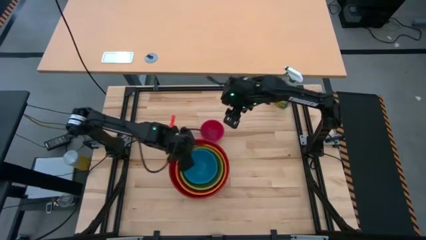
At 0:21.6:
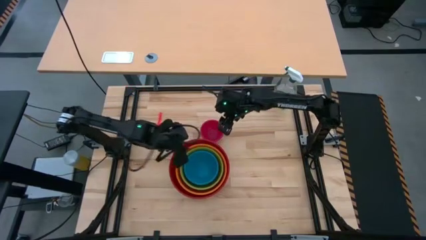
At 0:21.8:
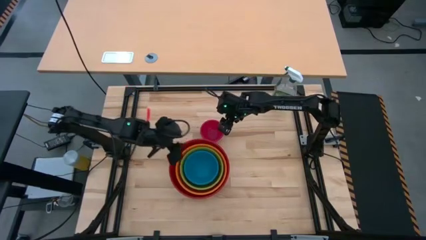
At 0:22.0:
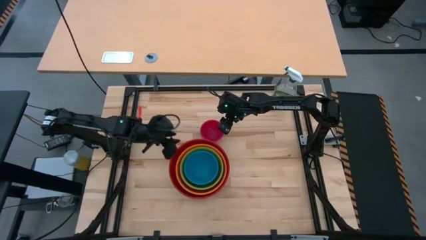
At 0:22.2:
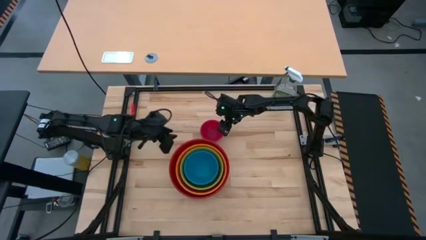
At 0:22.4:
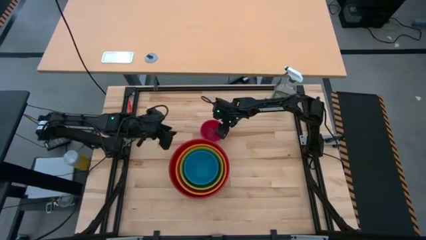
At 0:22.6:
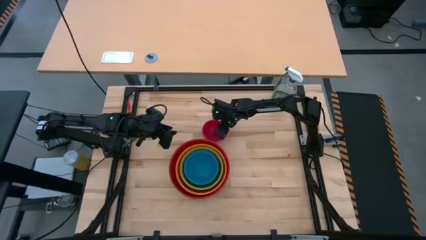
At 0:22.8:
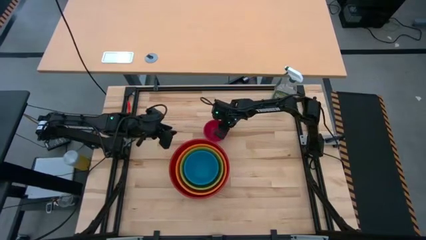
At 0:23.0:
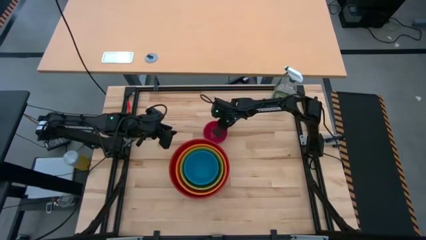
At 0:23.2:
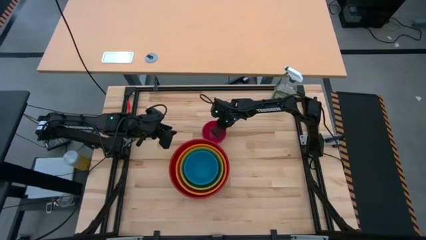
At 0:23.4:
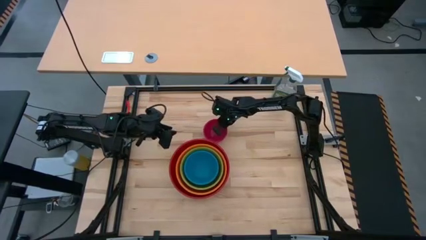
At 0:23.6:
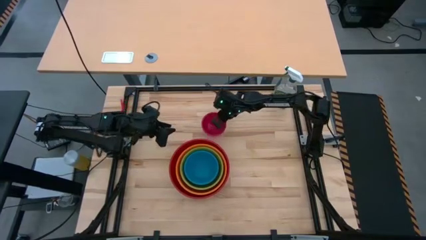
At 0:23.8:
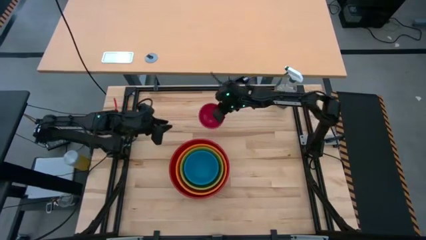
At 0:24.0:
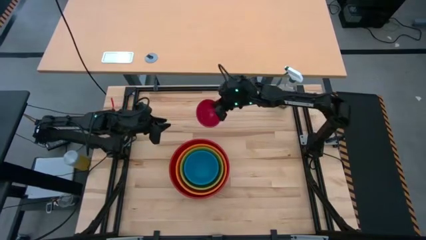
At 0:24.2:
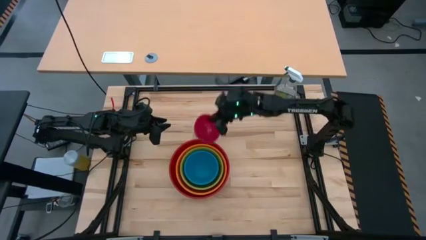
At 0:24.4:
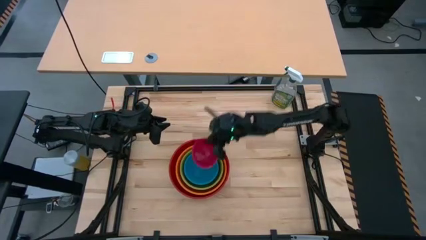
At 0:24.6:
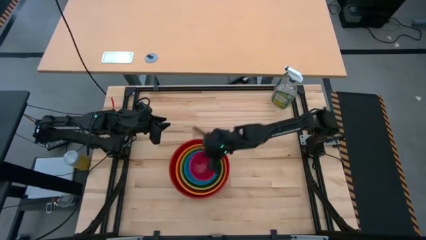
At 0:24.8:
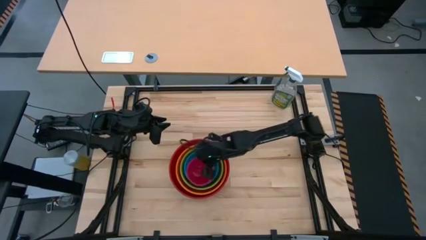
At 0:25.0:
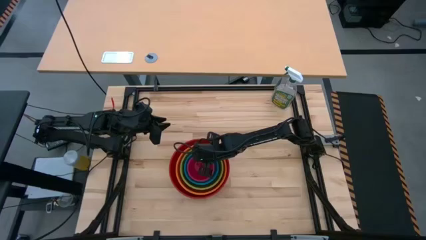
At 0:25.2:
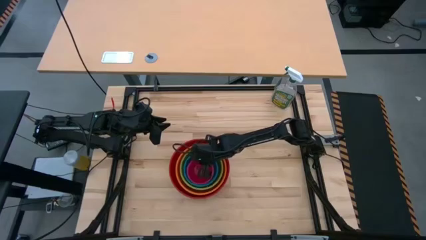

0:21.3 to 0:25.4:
Stack the pink bowl on top of the blue bowl

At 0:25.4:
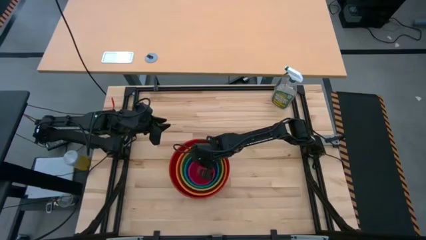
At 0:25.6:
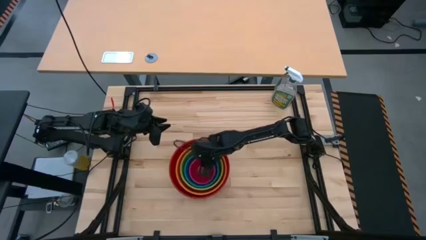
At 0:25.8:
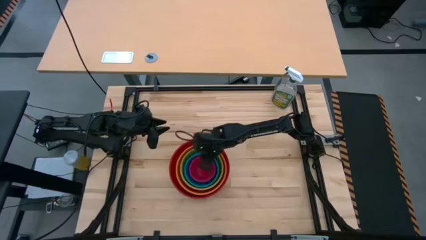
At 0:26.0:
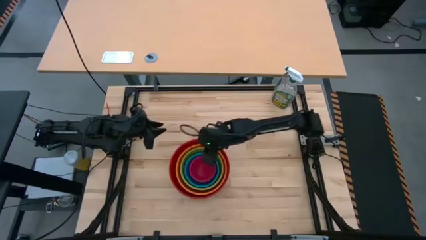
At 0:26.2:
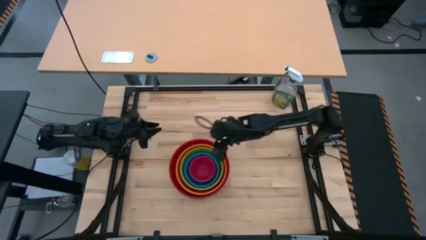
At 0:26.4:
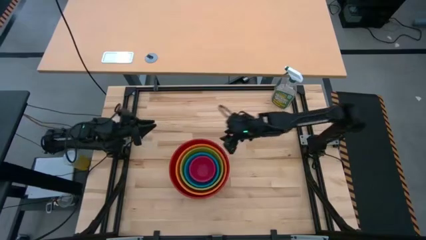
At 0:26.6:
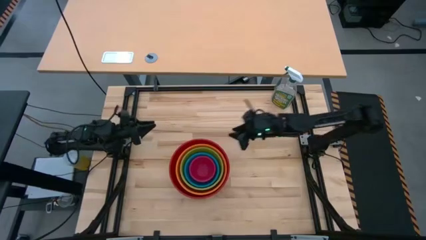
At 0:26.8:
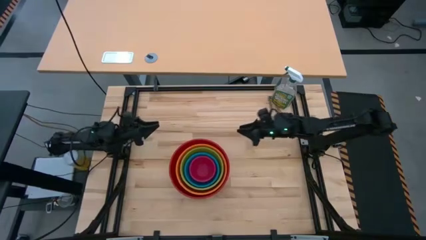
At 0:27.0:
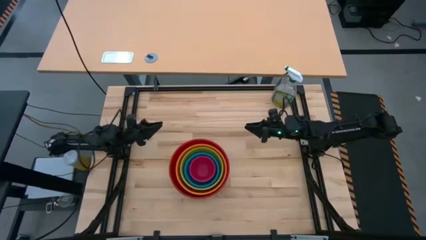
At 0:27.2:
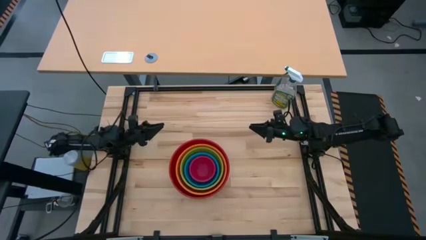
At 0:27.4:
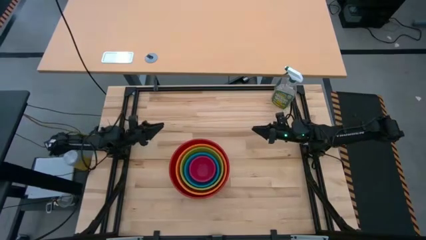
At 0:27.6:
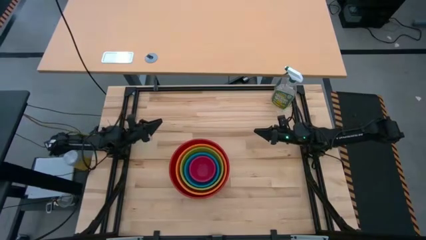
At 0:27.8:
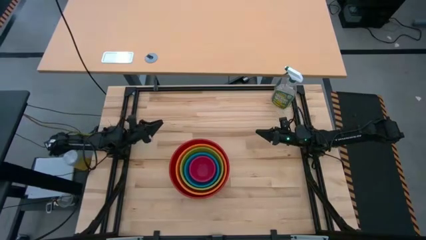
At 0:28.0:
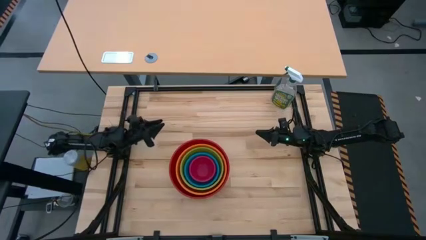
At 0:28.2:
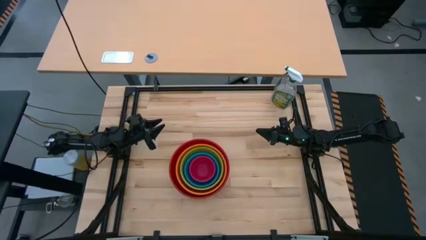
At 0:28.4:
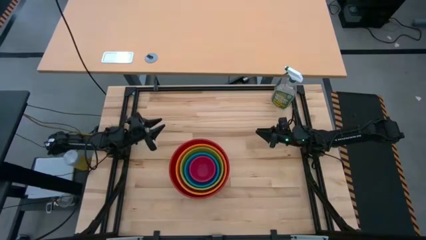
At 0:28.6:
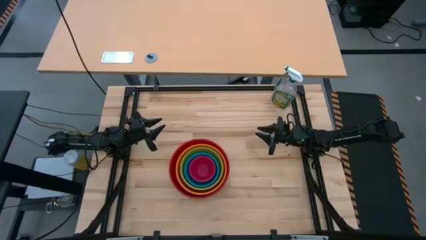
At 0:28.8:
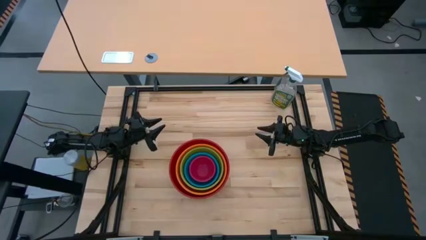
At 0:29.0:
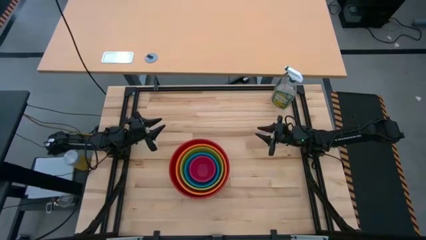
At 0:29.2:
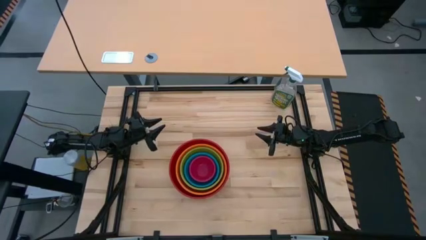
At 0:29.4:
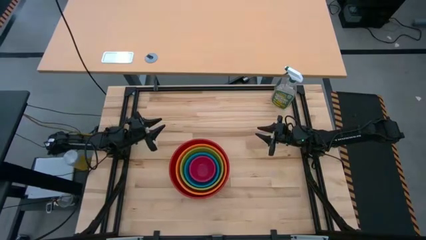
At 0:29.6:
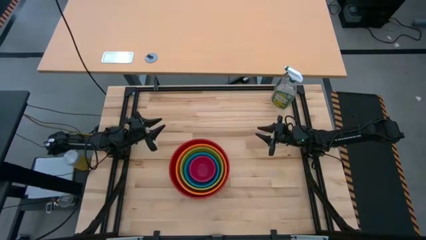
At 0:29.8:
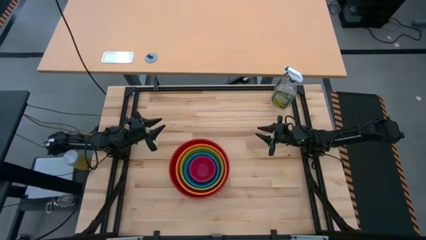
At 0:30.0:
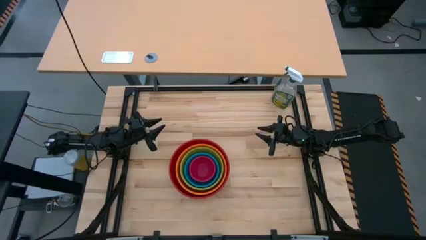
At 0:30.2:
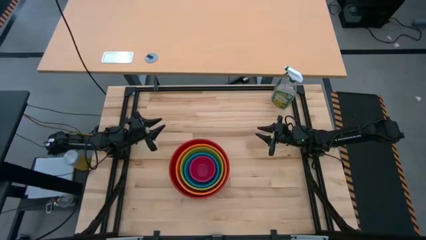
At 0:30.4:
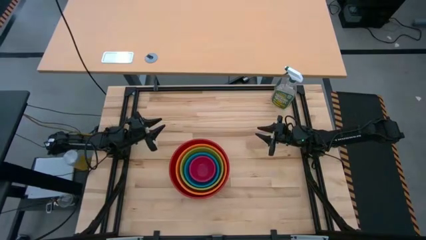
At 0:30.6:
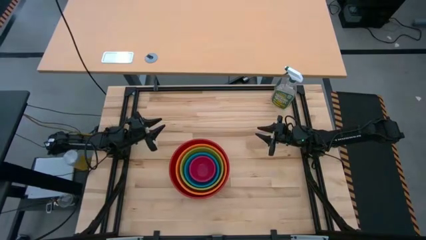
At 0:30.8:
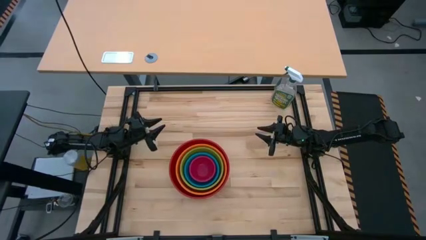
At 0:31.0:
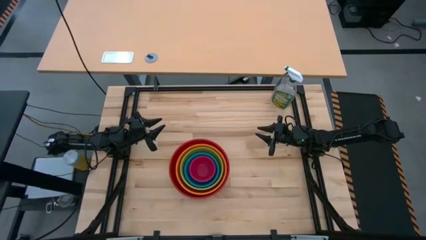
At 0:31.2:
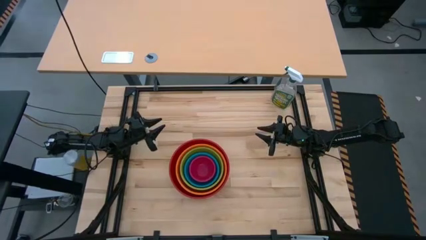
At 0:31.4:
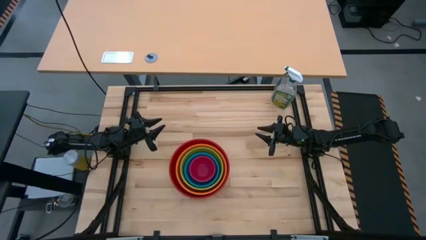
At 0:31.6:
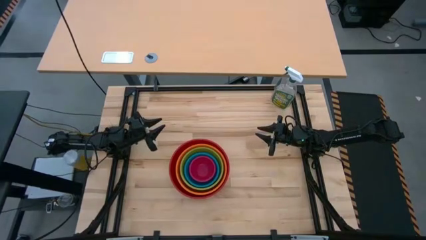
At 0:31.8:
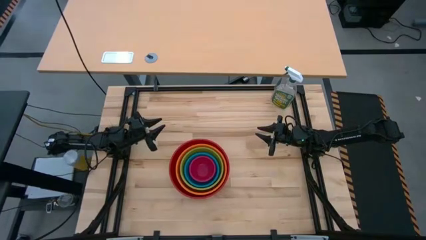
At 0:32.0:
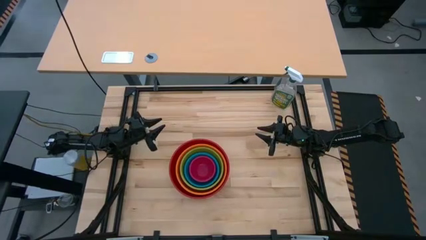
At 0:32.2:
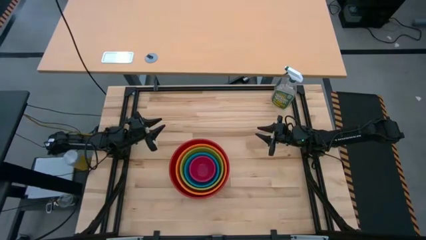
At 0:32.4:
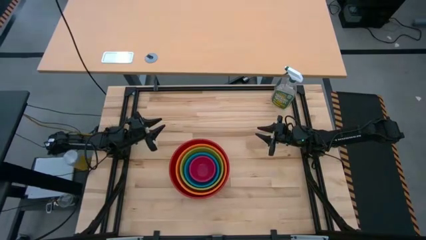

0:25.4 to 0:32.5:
Return to Home Position

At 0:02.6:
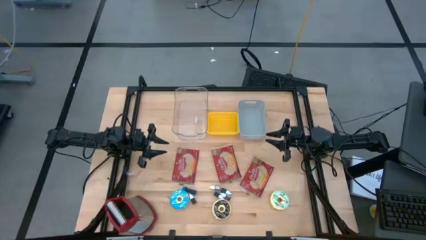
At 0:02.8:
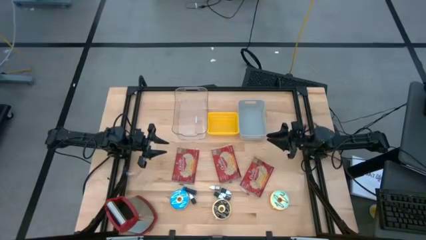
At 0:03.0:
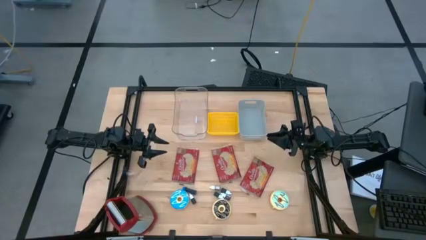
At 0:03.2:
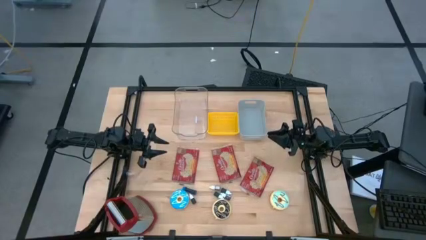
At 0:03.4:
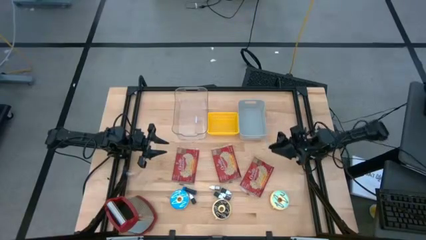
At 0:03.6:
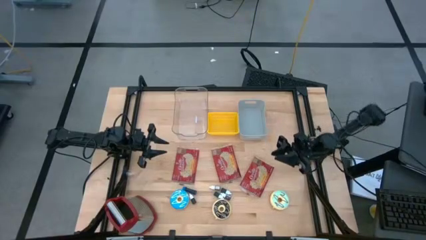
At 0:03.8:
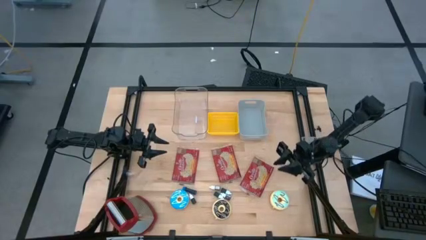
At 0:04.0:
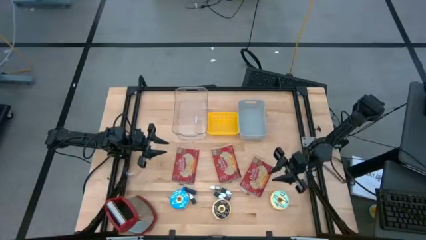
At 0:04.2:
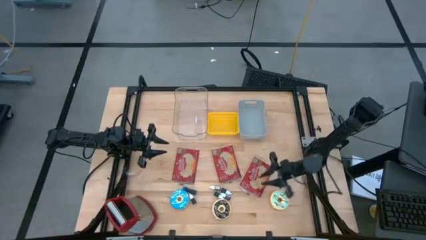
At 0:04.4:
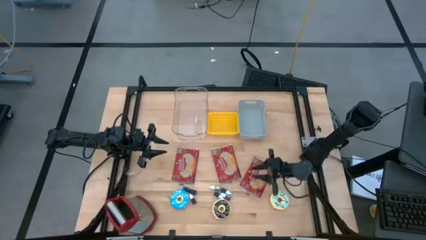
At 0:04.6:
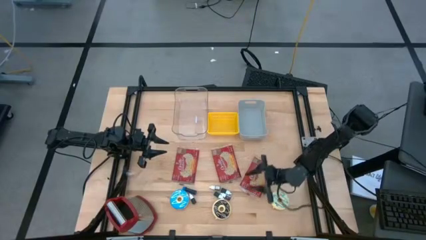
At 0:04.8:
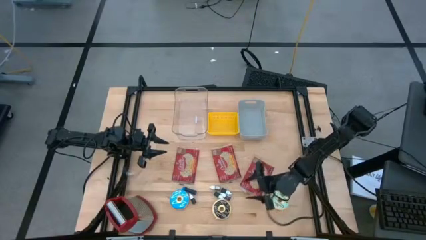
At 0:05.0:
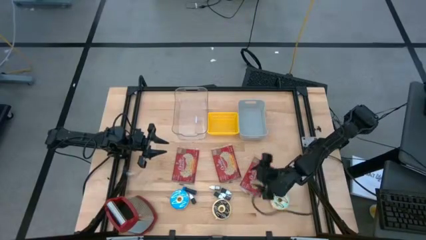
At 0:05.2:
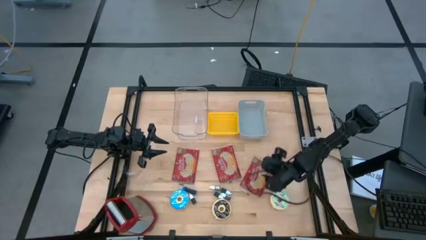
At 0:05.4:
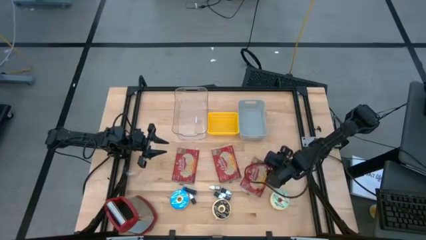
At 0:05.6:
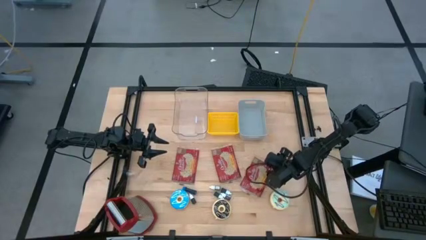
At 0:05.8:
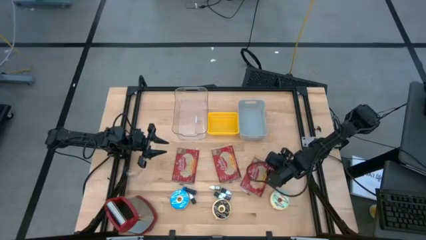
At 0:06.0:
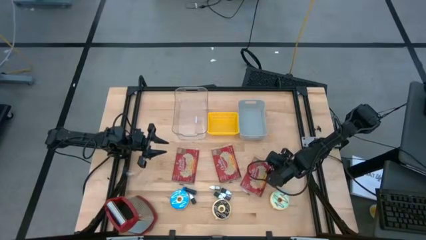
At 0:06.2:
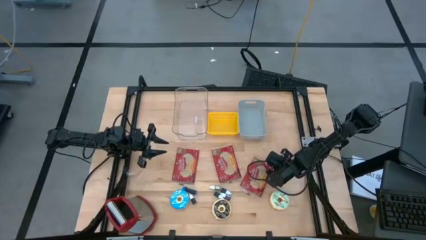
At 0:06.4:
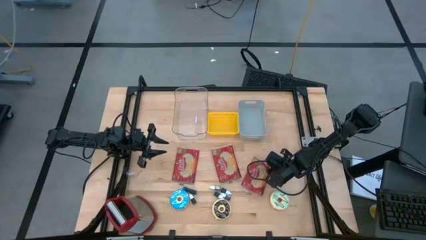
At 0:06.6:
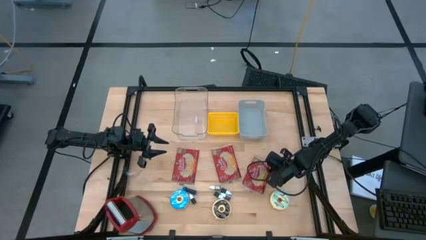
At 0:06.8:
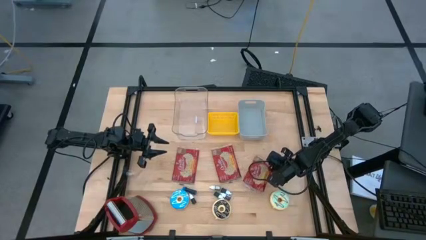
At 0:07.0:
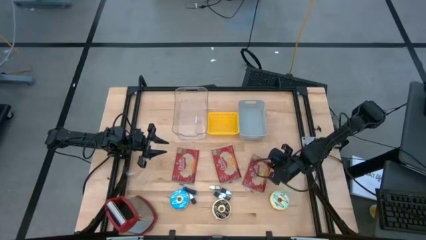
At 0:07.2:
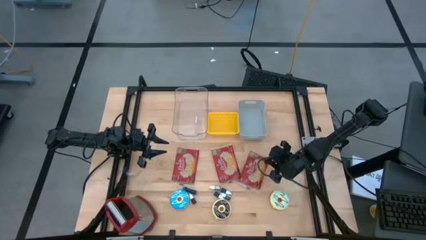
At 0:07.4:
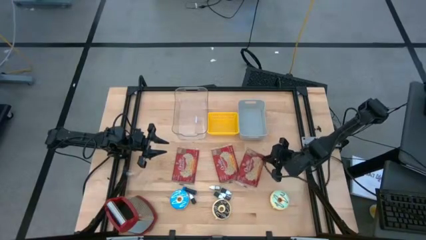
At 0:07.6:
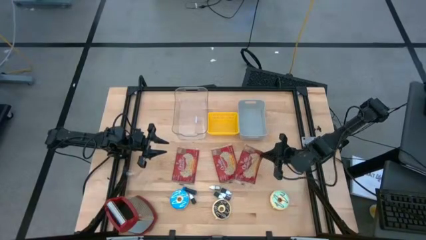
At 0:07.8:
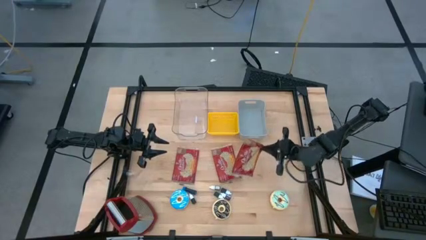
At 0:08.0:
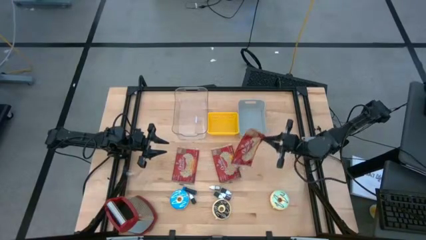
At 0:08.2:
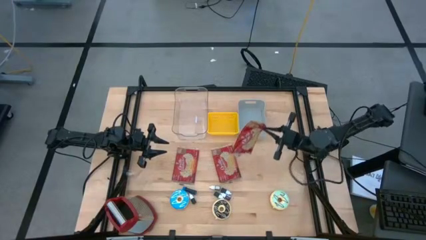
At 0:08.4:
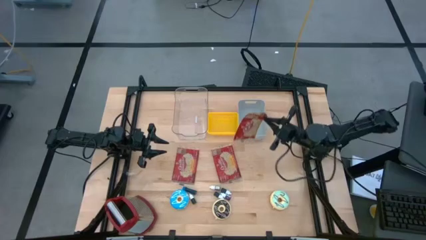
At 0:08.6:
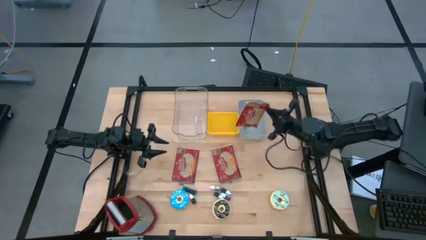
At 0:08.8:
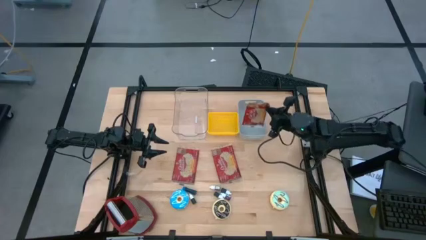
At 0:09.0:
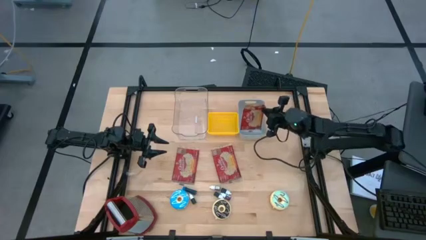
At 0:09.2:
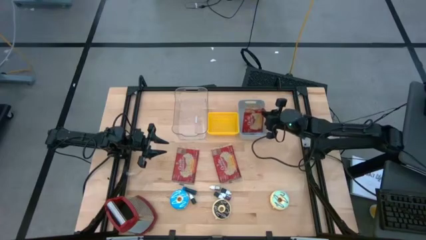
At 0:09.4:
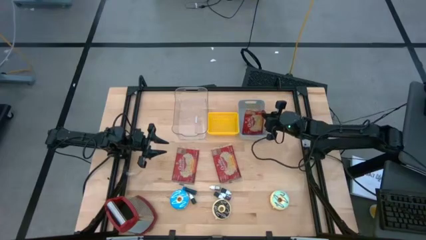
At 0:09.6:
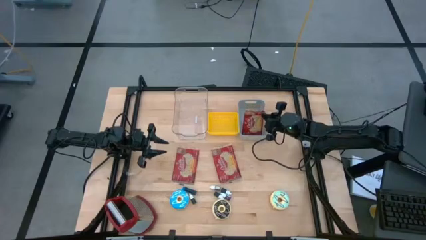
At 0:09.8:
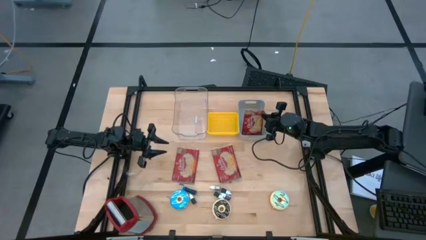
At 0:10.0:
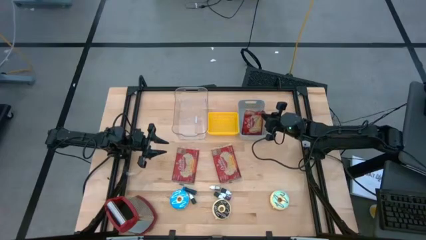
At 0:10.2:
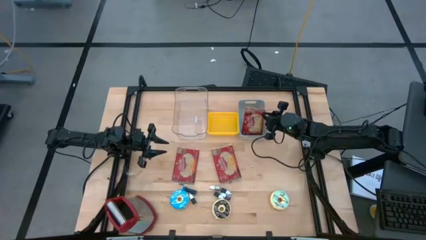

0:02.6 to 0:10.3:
Put the right red popcorn bag into the gray bin
